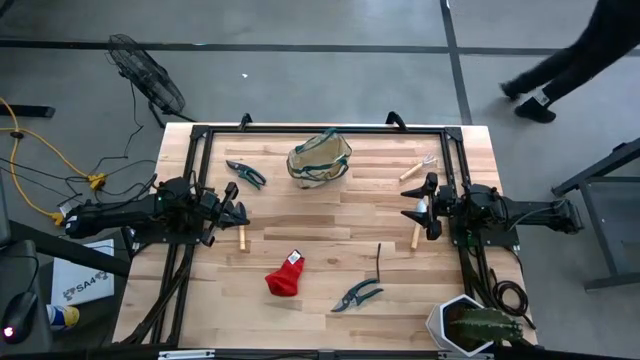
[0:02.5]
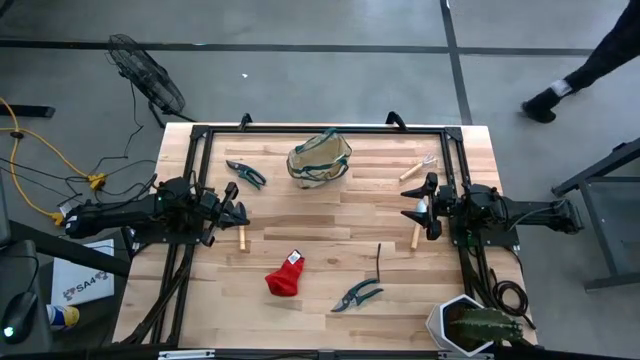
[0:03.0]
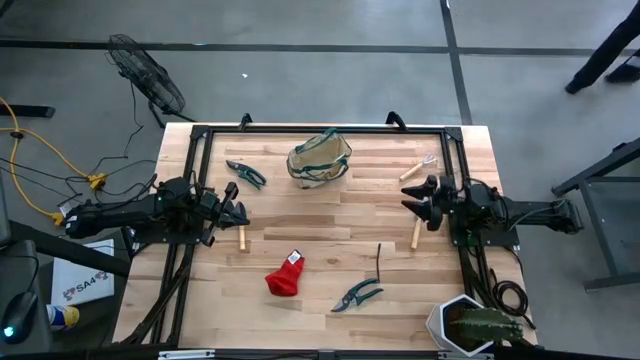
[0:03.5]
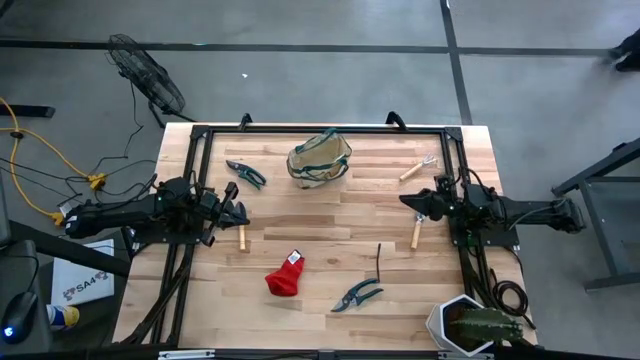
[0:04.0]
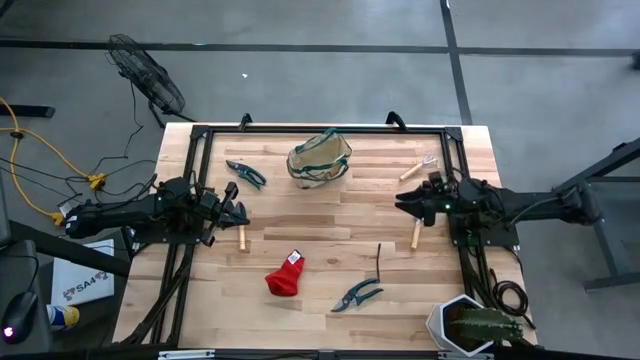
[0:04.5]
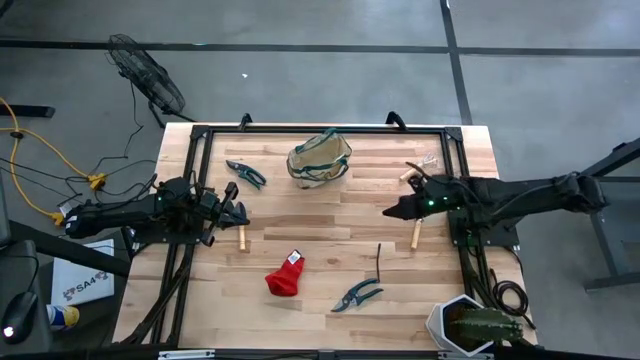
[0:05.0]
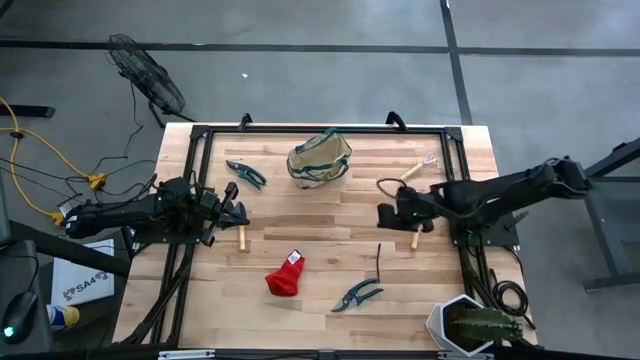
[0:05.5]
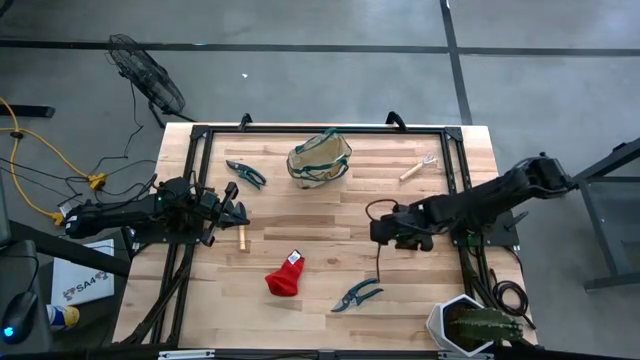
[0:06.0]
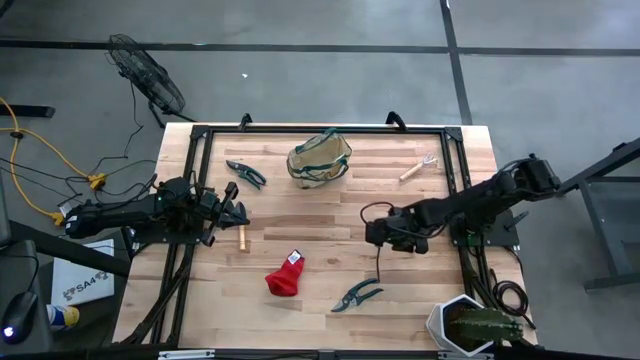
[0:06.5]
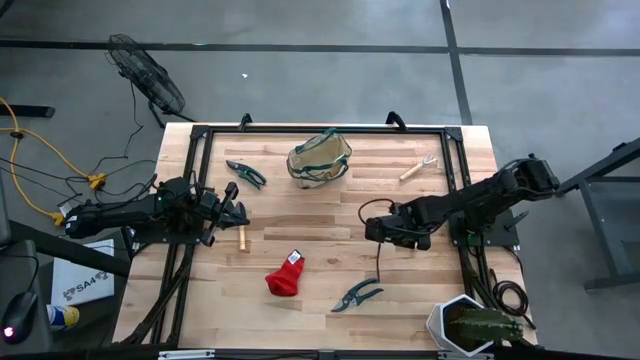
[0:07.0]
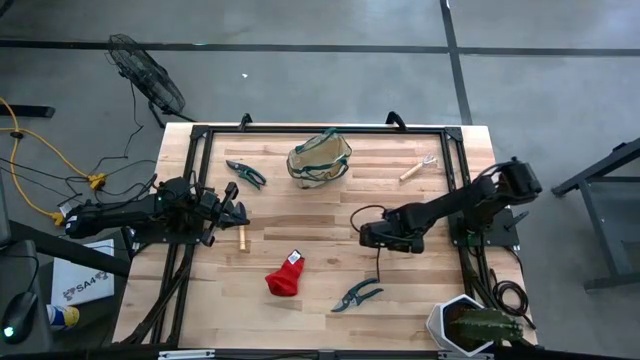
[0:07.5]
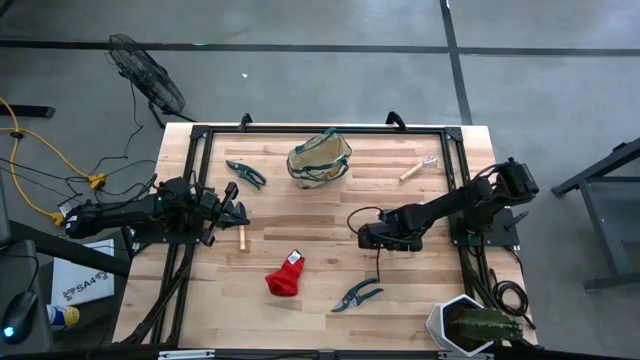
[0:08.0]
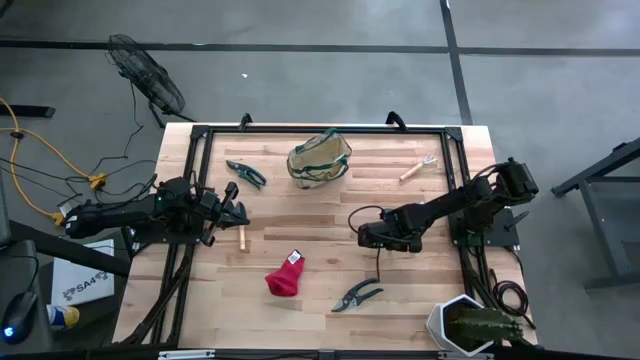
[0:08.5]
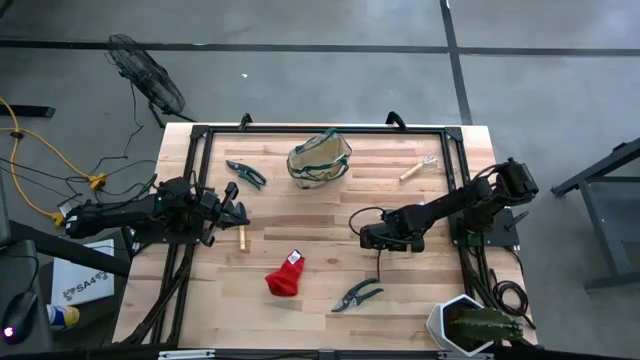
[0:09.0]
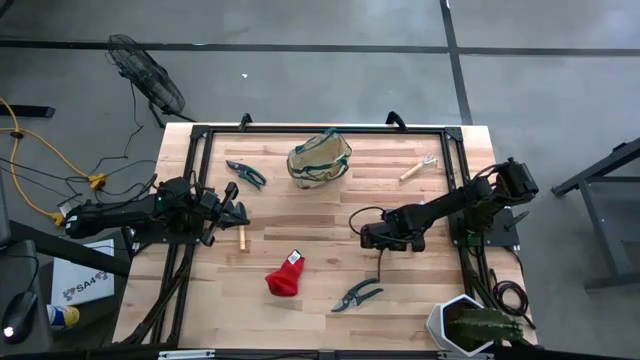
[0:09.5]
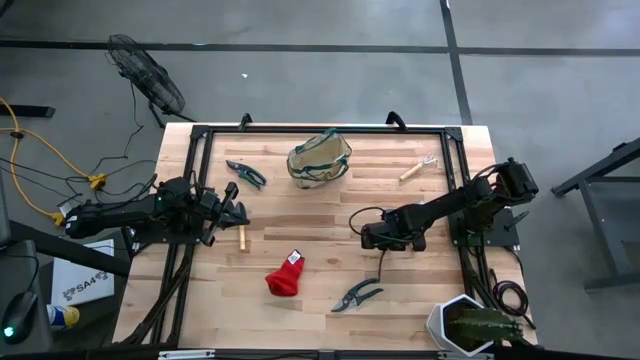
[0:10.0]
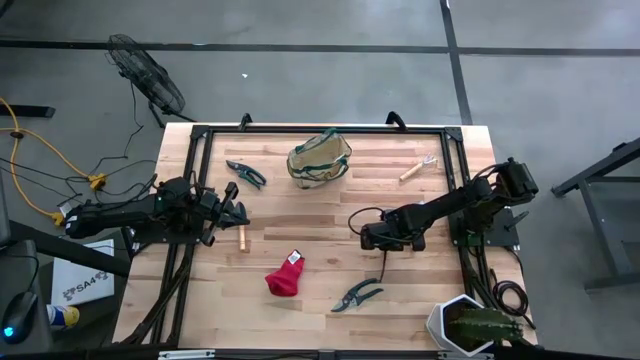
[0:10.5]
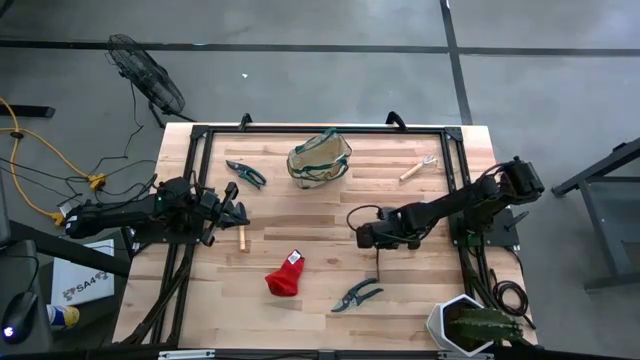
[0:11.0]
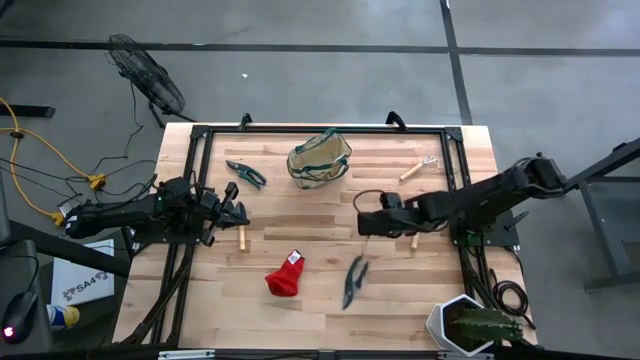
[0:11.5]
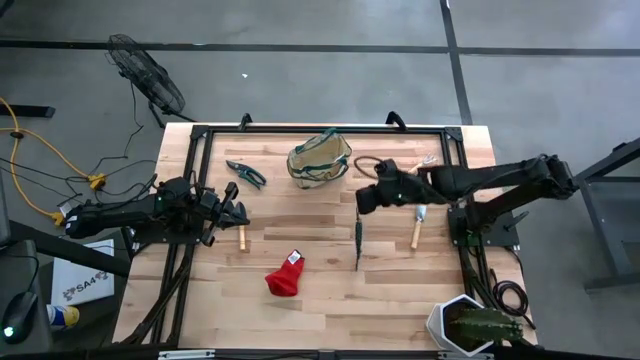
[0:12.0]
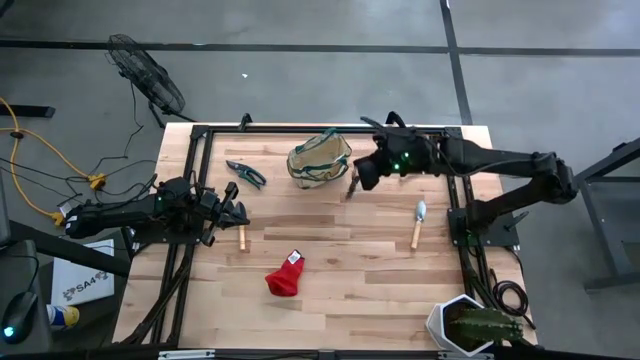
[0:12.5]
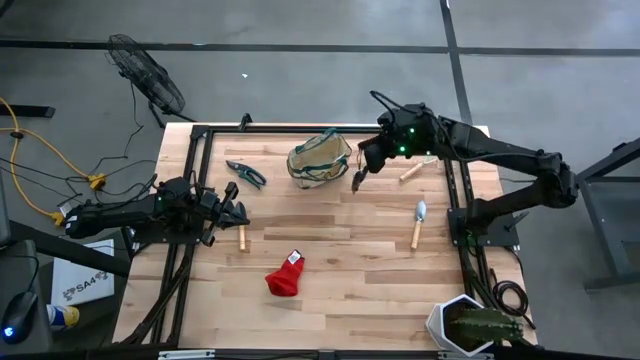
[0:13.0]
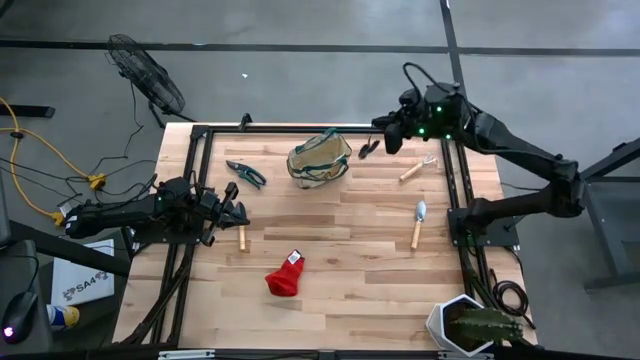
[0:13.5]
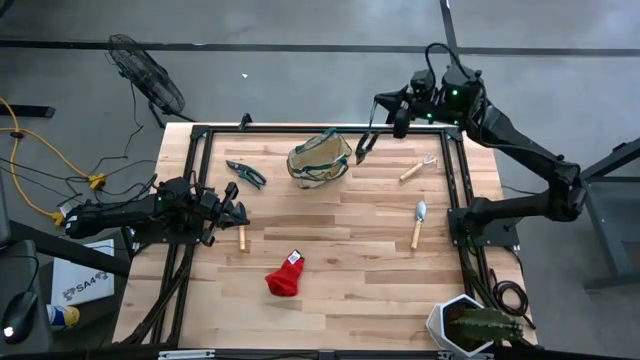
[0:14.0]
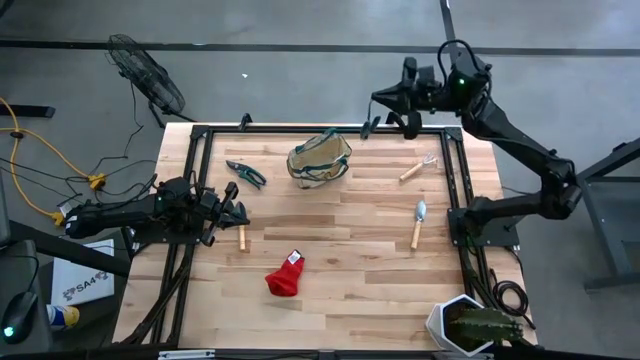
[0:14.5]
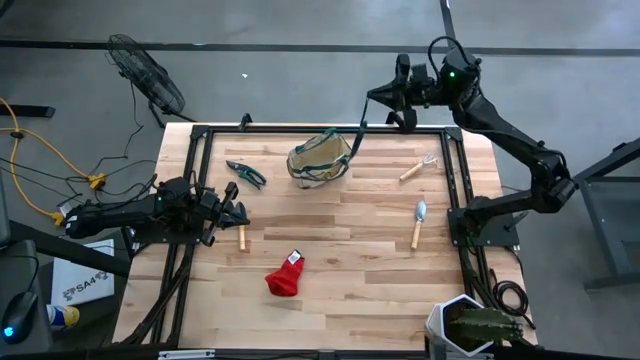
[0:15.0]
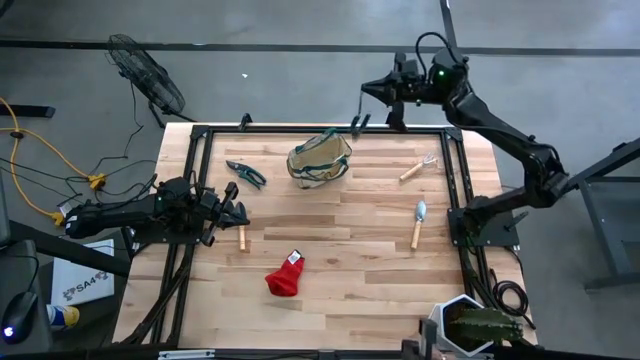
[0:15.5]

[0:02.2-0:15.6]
Task: Pick & Place Garden tools in Gardening bag
Put the green shears into the white gardening bag

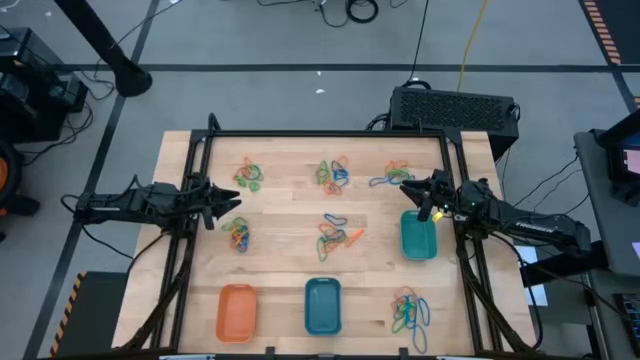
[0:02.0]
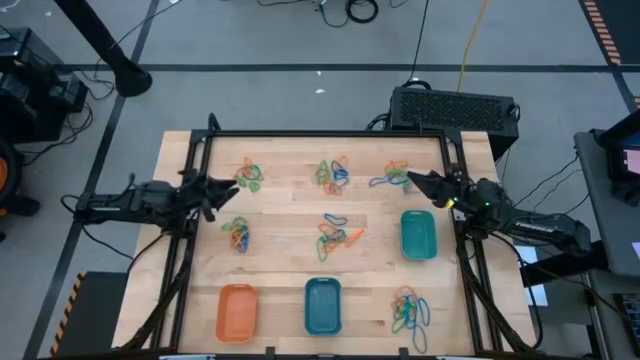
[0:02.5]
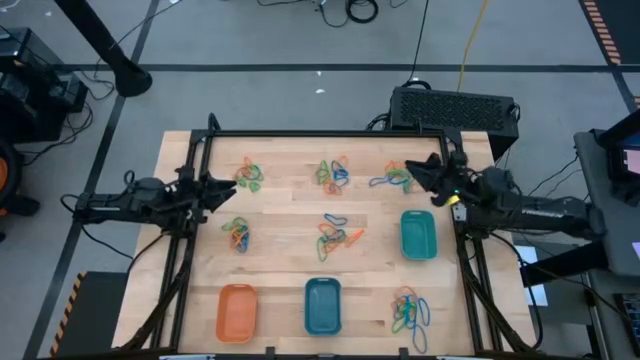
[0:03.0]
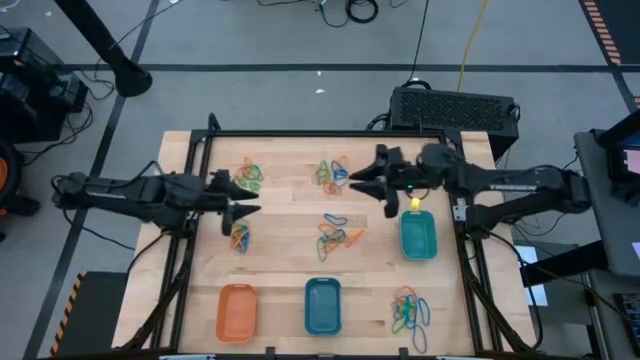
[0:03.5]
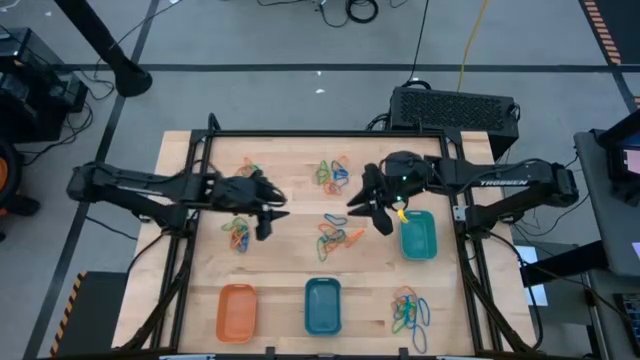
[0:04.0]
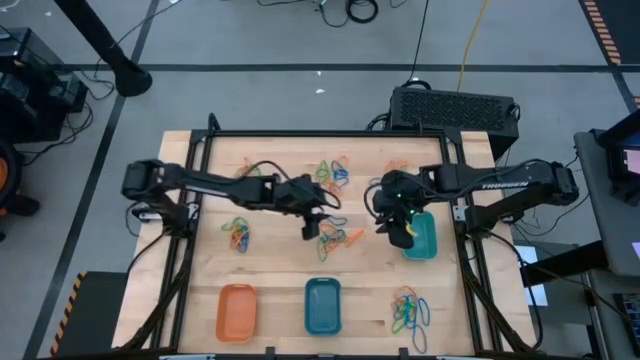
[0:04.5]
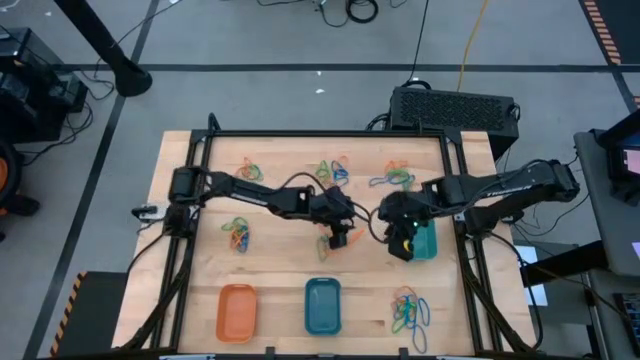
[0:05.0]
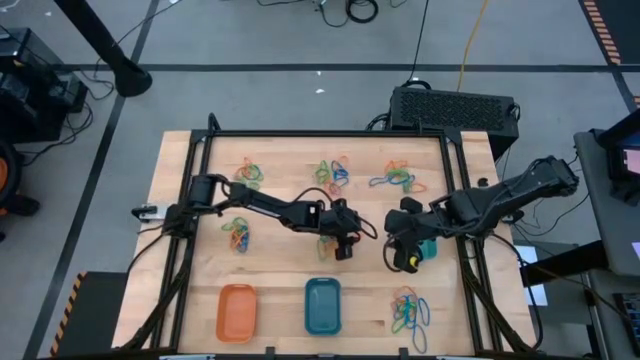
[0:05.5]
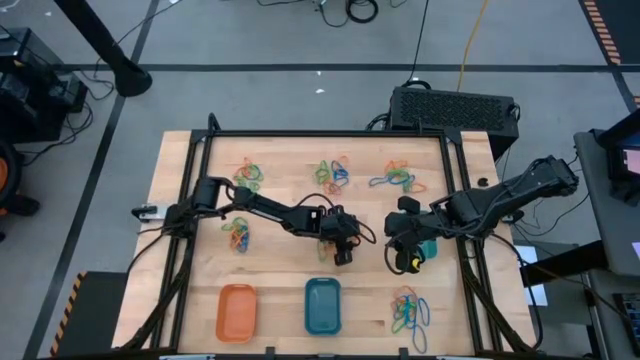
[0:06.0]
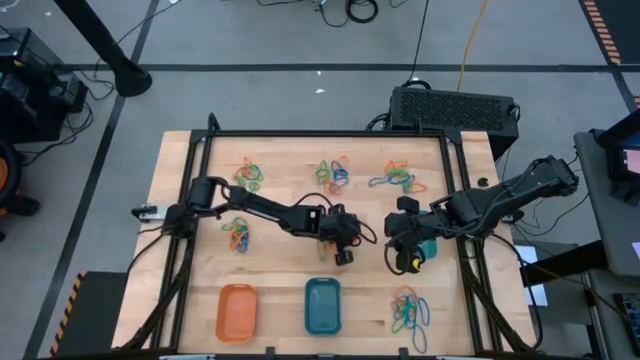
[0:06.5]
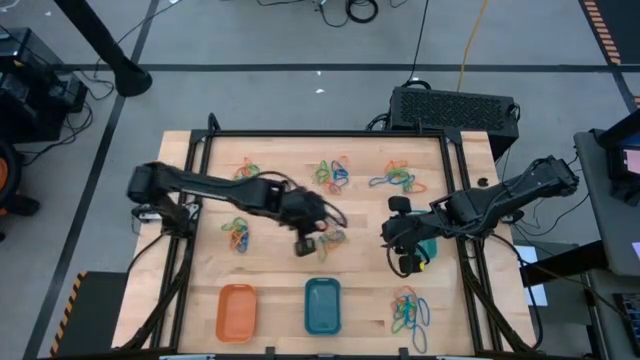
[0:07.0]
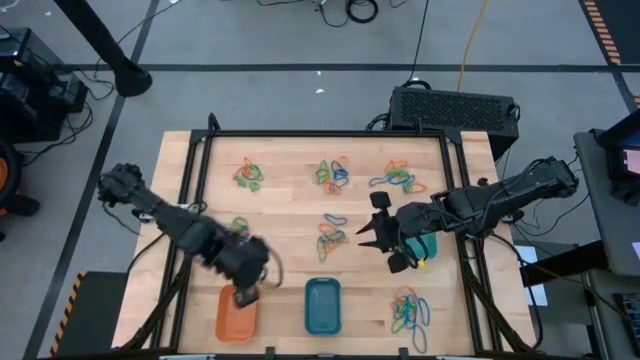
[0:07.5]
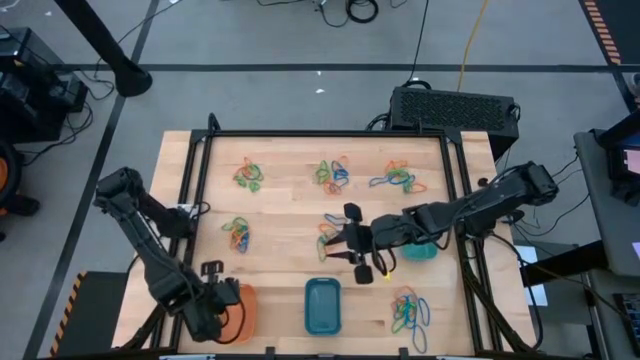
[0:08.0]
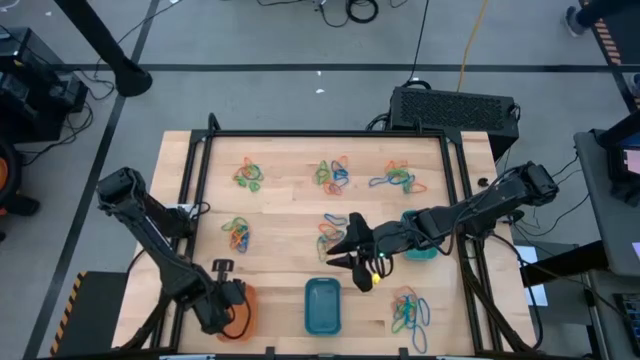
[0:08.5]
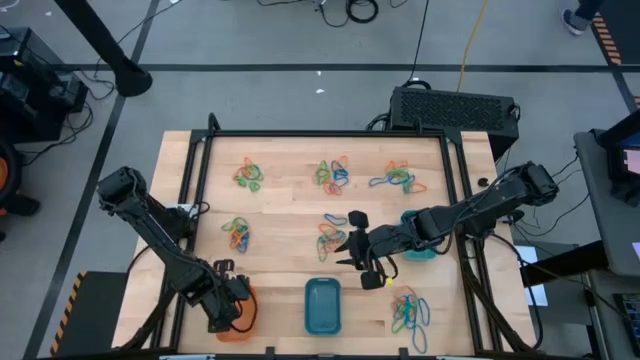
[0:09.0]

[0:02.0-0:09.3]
Task: Sort rubber bands into baskets
Put the orange rubber band into the orange bin
